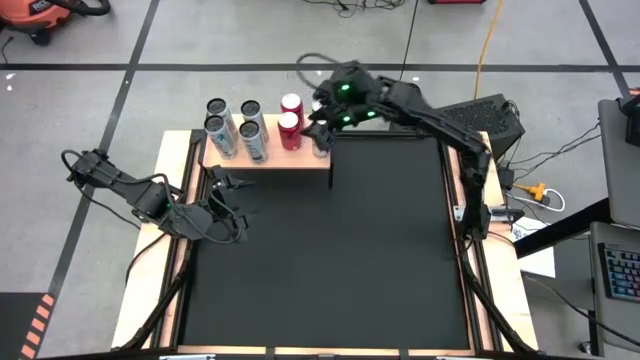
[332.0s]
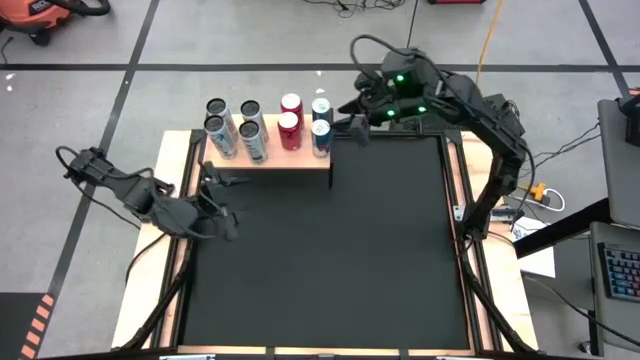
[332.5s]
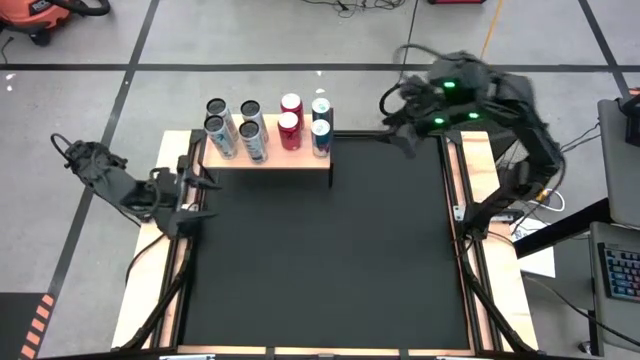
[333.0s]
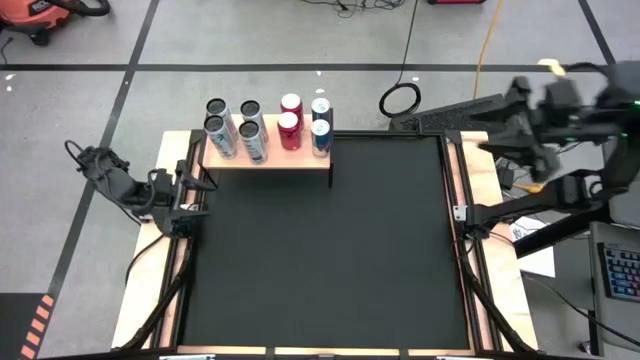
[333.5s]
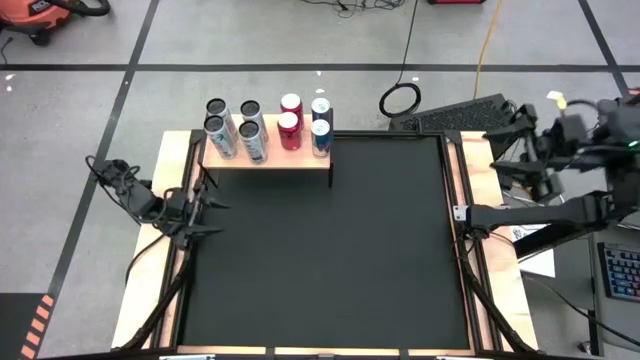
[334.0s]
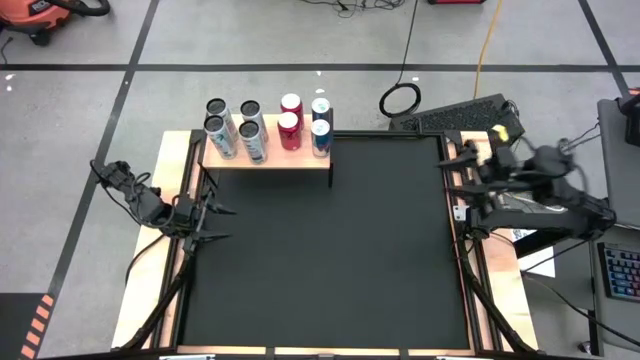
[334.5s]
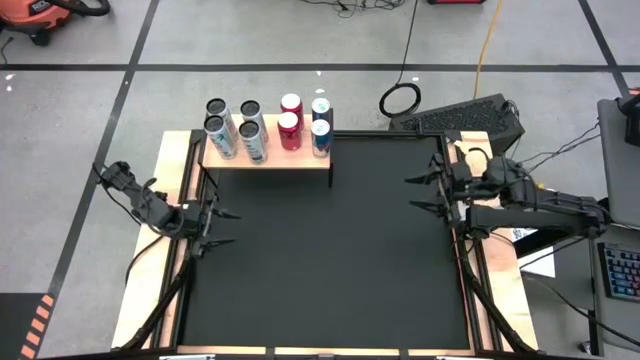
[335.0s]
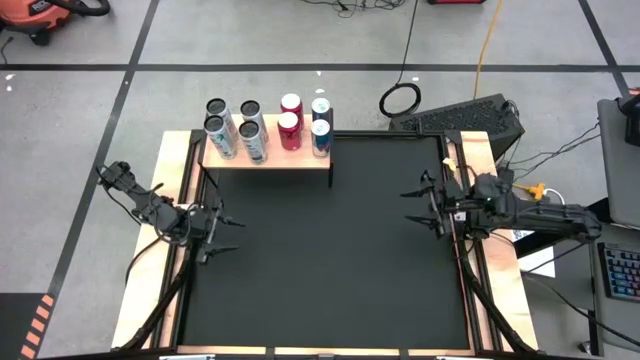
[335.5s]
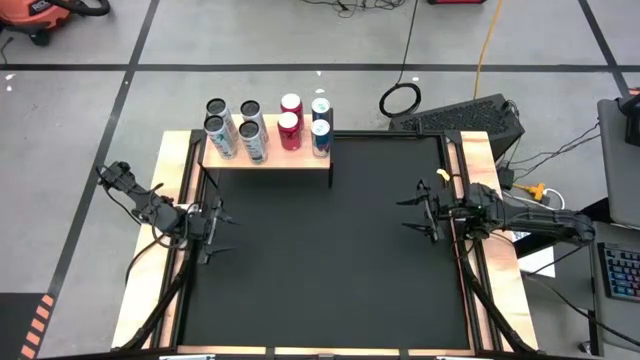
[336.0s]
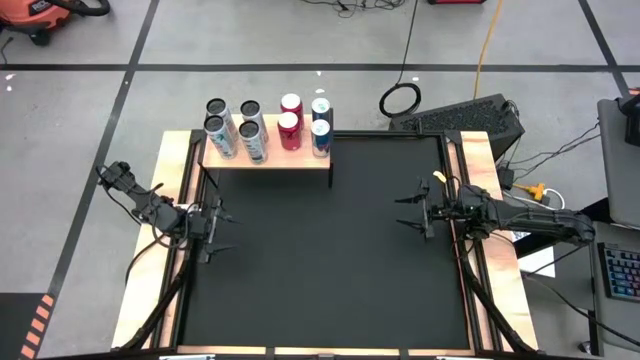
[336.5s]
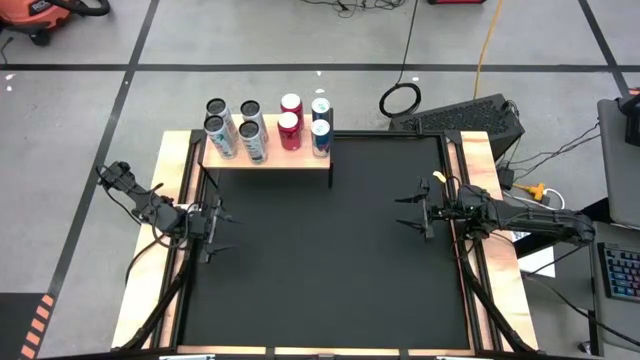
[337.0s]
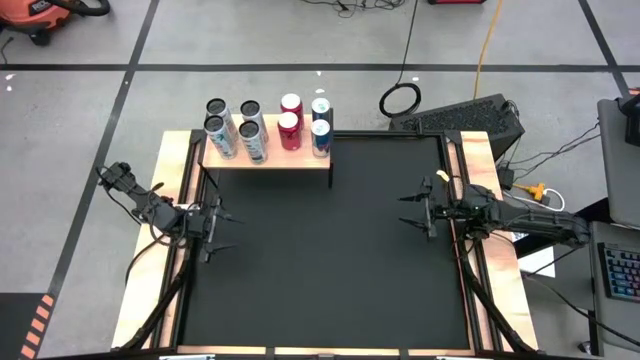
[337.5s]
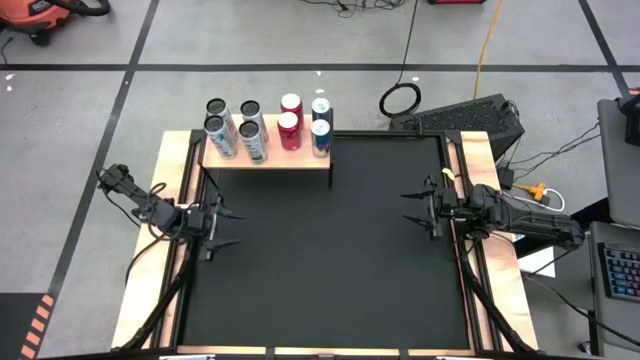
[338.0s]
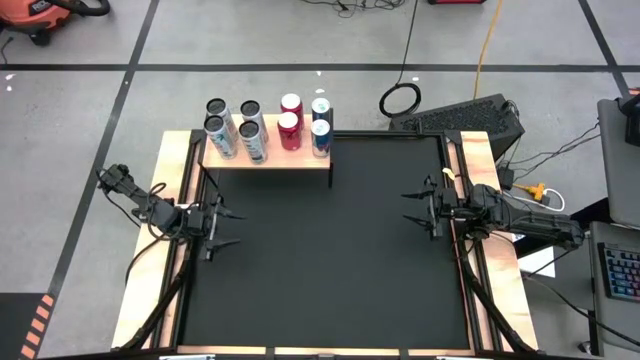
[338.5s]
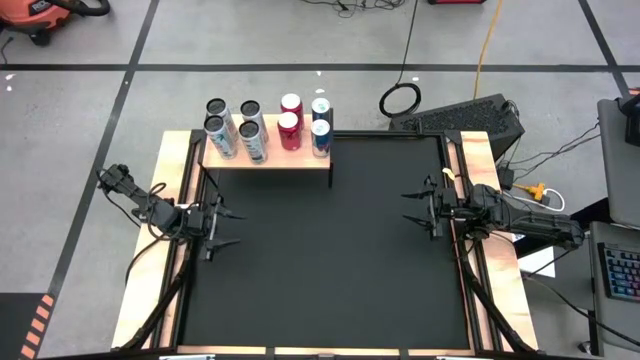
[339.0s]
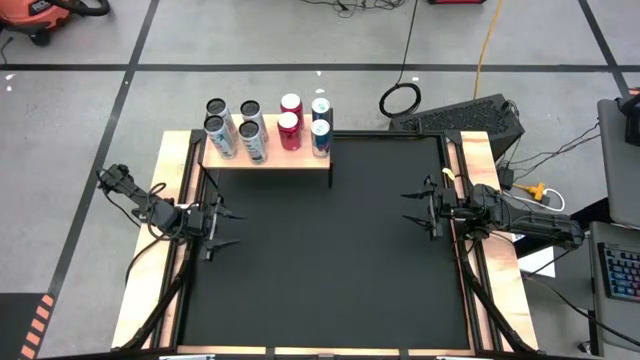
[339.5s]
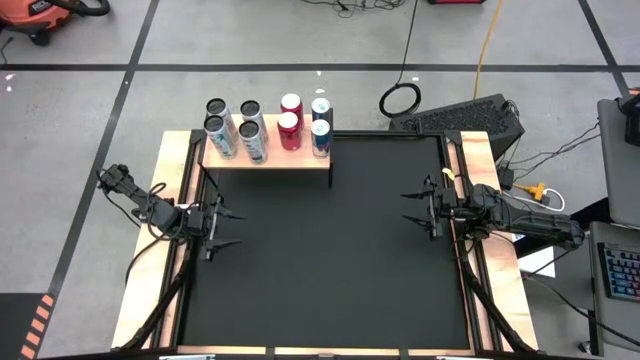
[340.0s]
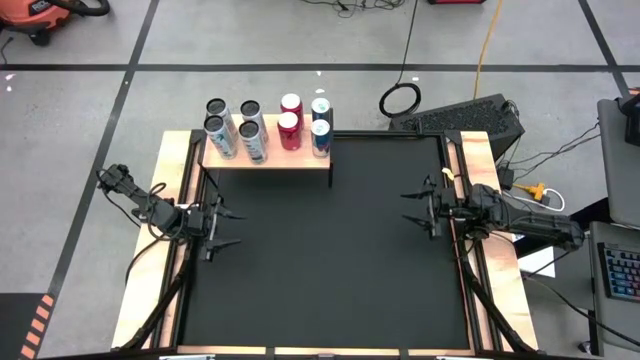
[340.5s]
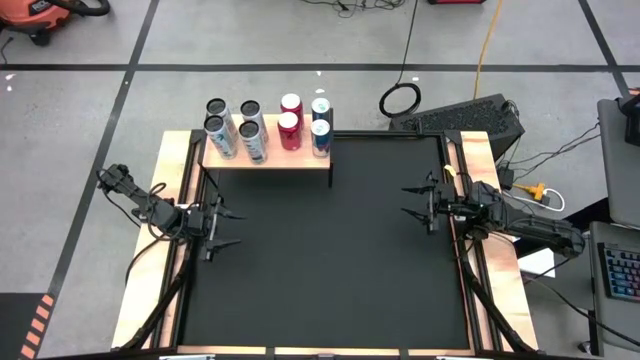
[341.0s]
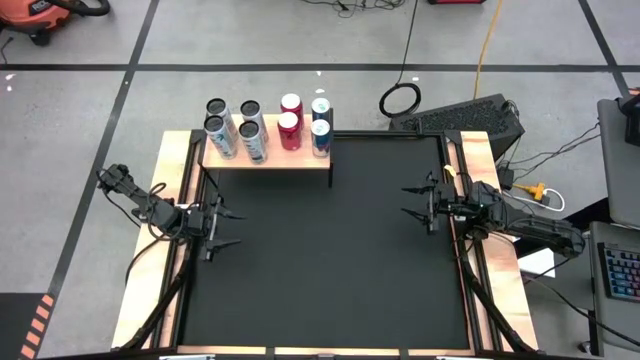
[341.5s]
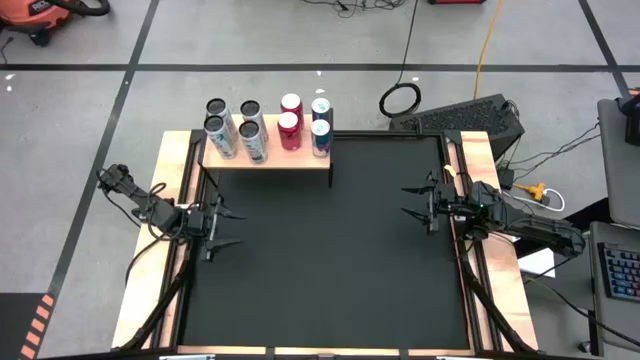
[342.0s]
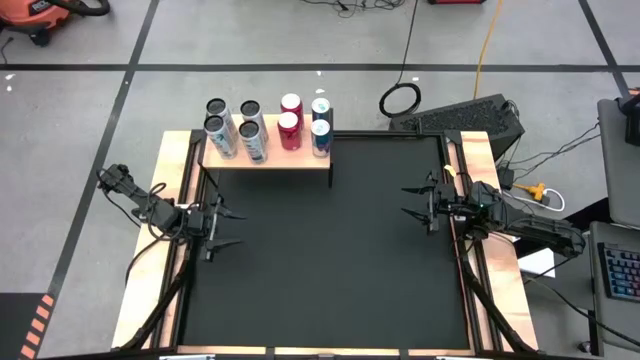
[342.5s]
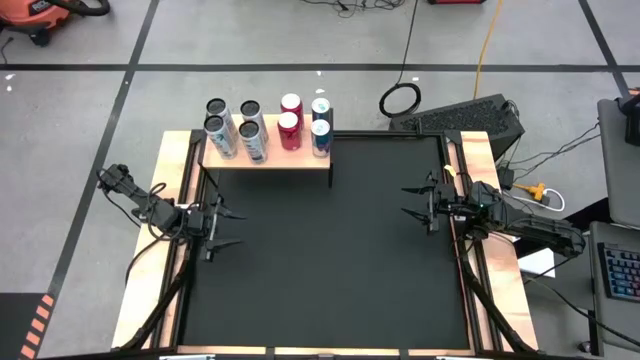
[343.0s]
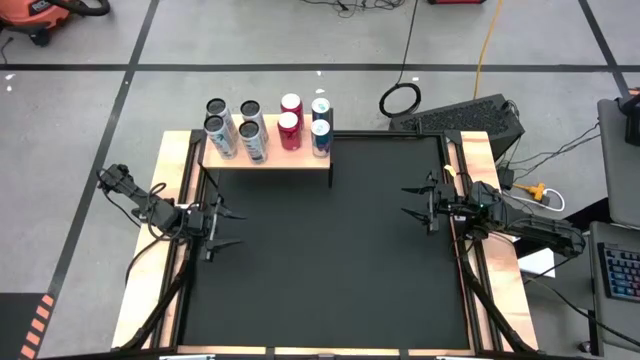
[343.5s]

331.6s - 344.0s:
Task: Place canned beverage on shelf
Return to Home Position

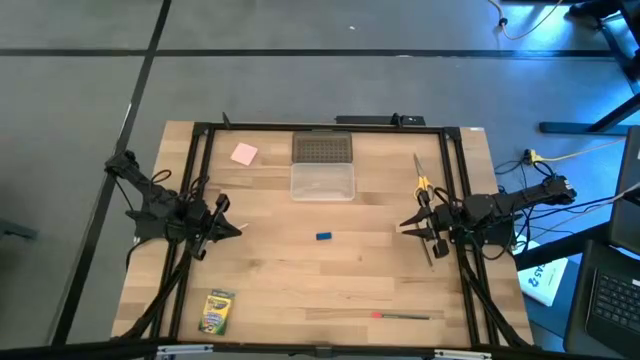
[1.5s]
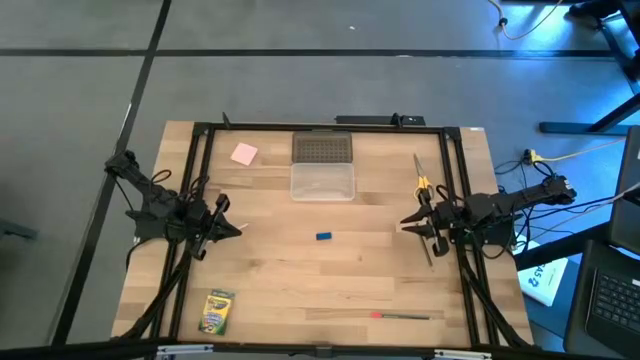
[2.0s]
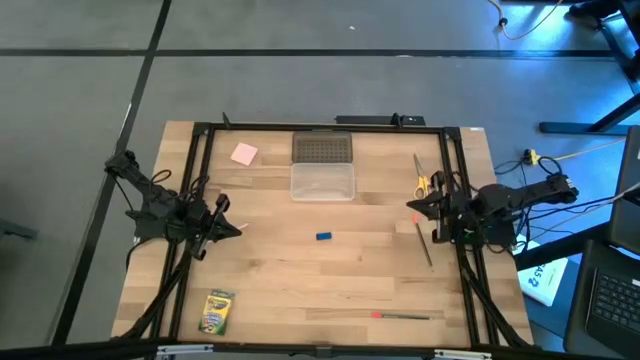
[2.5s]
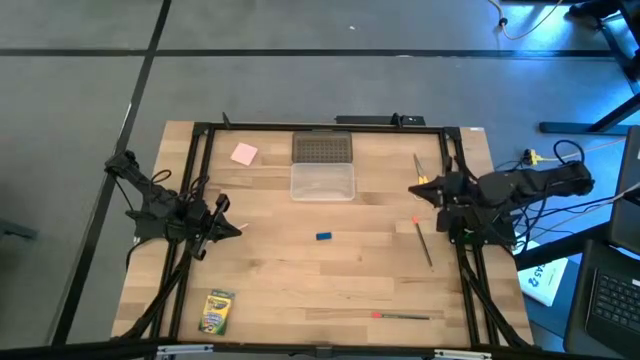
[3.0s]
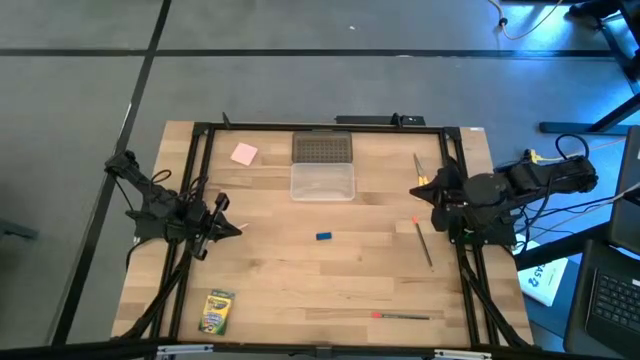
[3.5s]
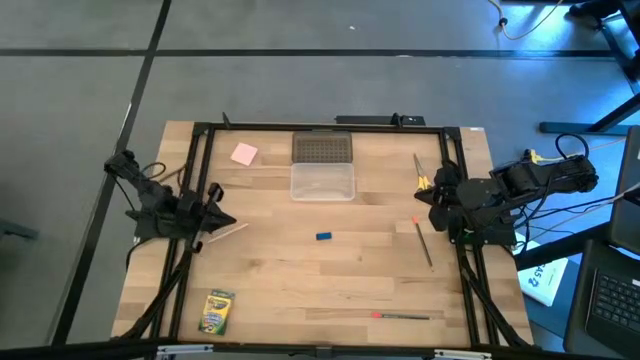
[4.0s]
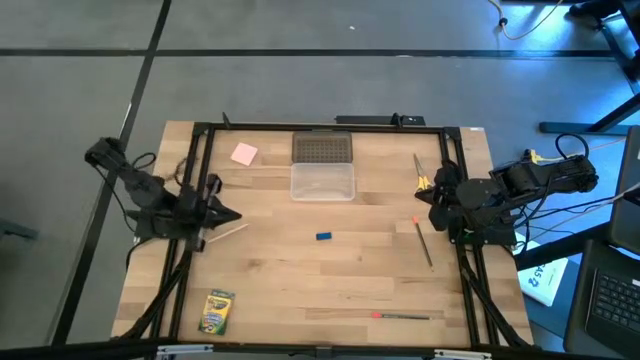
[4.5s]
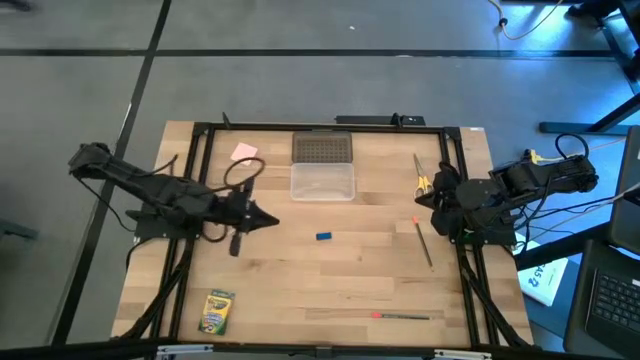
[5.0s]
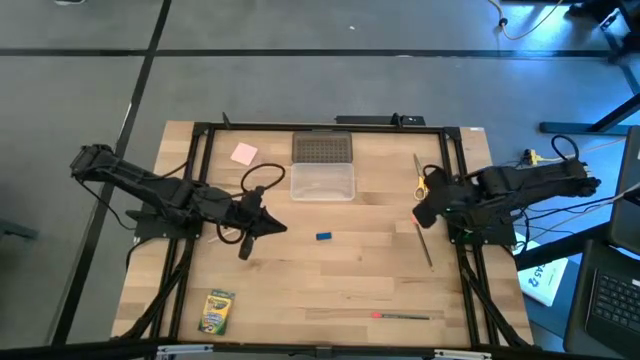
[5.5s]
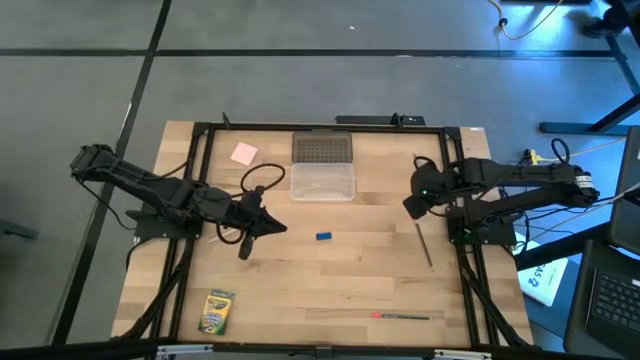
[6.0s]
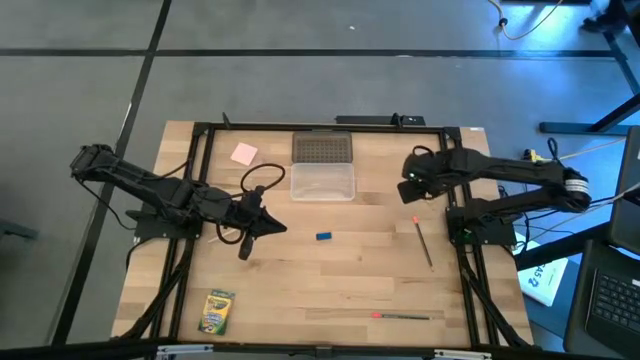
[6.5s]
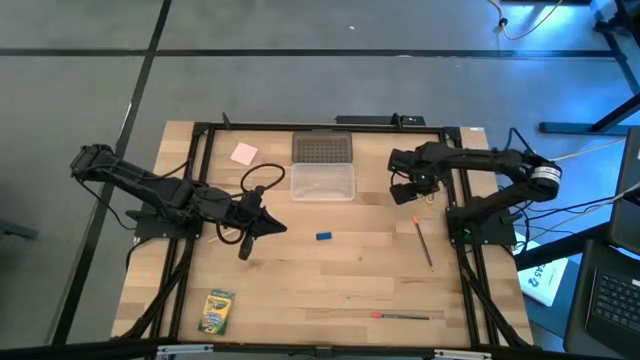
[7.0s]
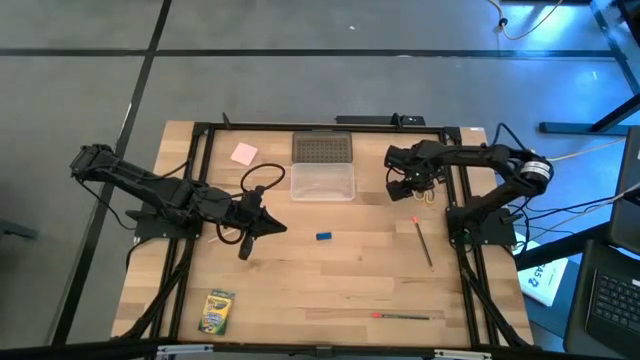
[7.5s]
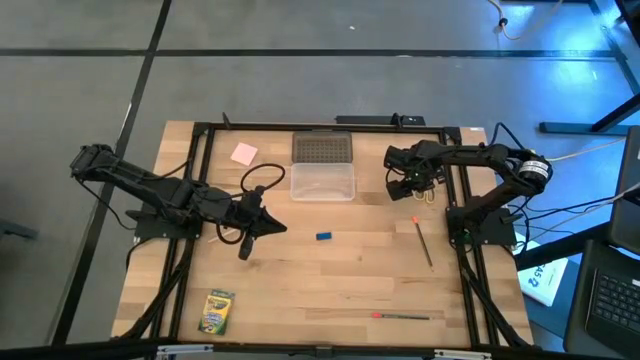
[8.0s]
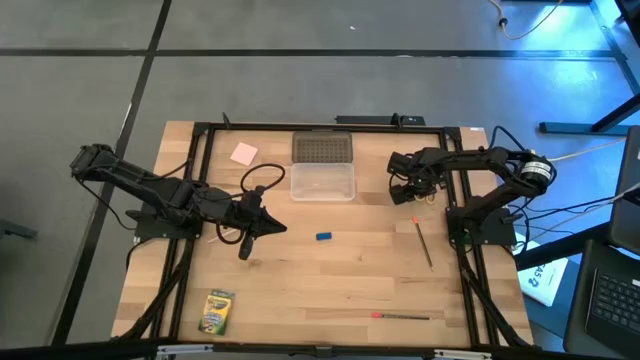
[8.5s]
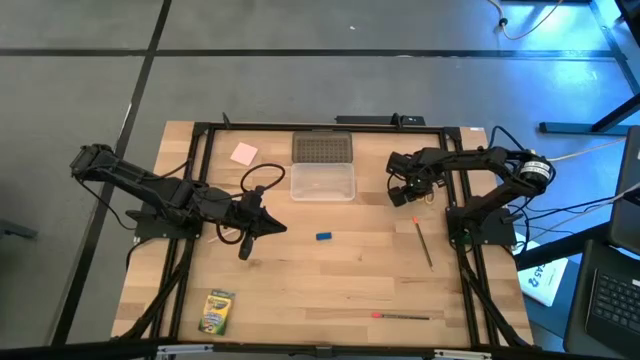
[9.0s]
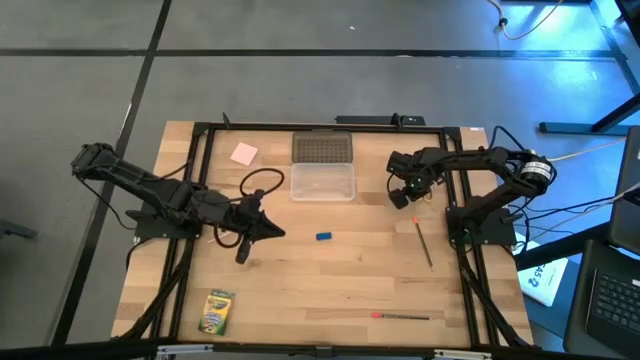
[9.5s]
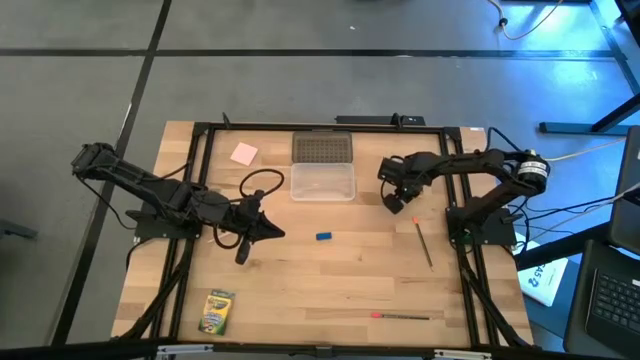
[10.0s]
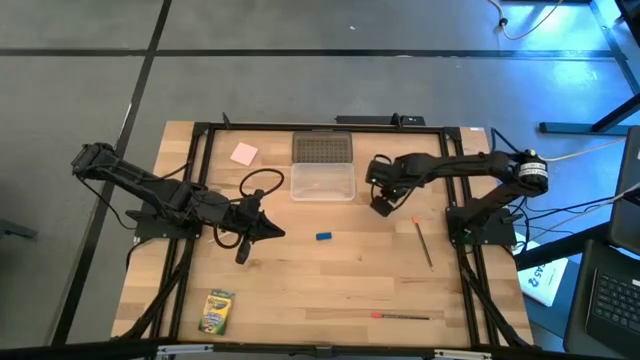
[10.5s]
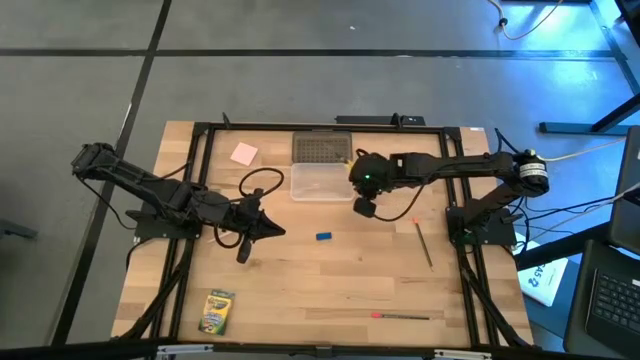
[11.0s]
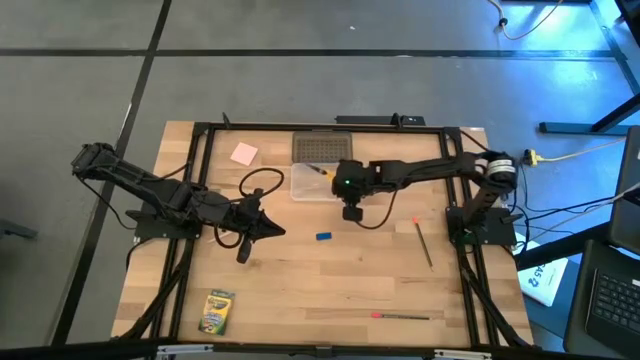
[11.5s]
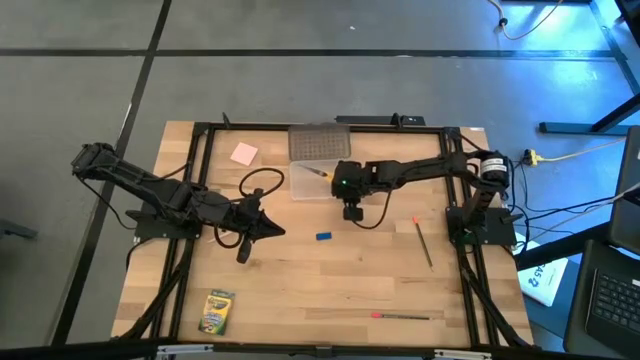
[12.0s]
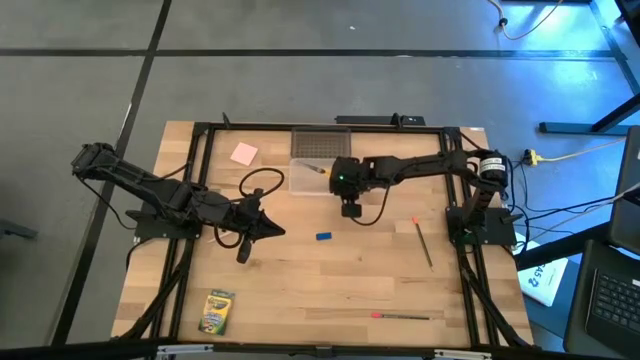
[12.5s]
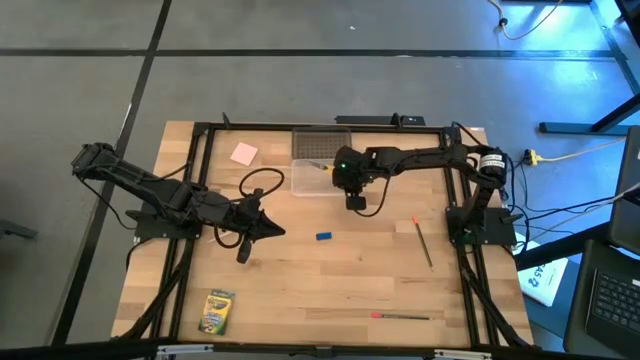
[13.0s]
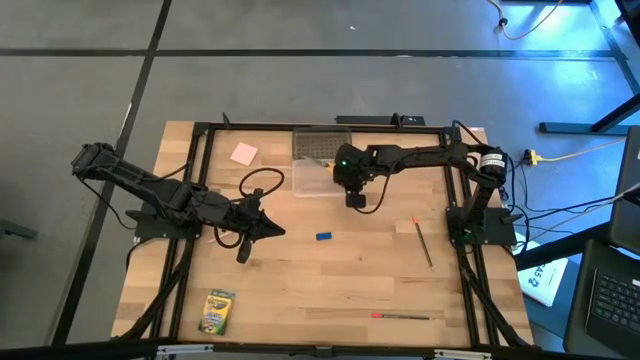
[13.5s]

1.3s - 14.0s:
Task: Pack school essentials
Put the yellow scissors into the black supply box
